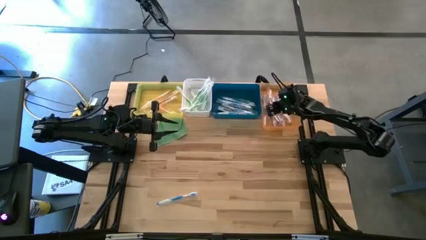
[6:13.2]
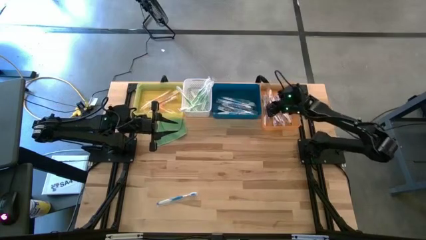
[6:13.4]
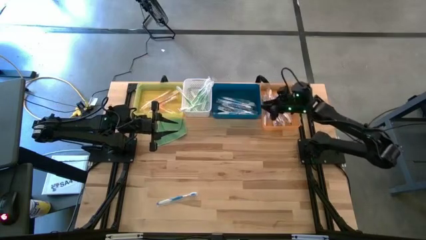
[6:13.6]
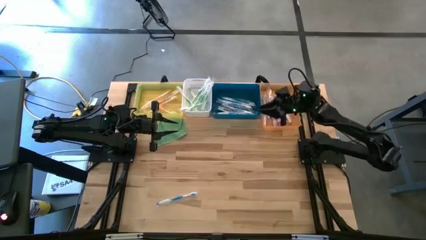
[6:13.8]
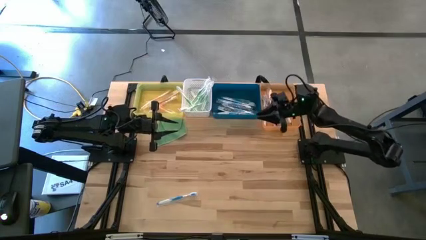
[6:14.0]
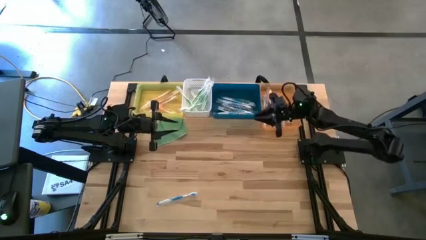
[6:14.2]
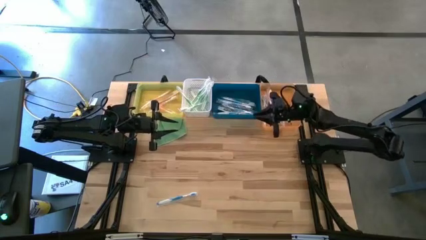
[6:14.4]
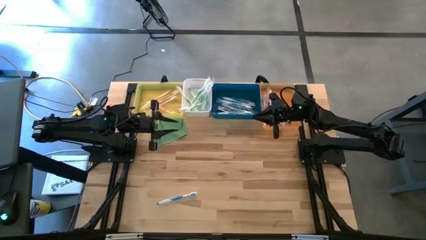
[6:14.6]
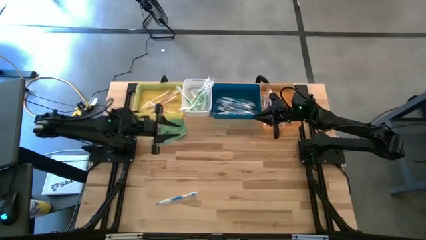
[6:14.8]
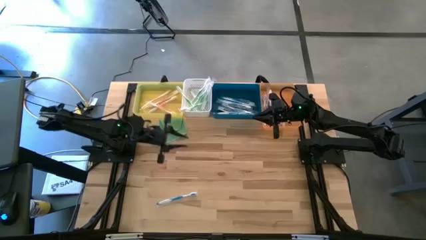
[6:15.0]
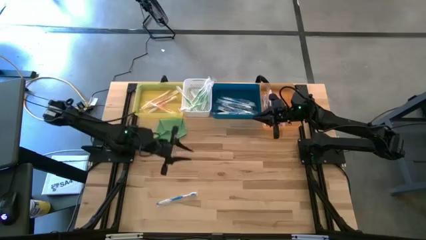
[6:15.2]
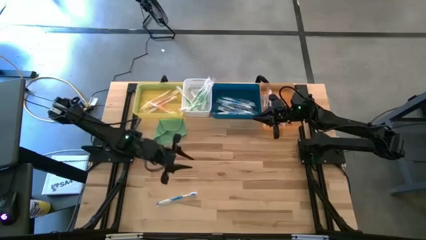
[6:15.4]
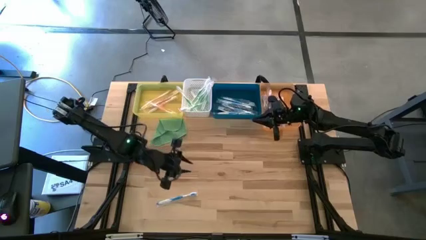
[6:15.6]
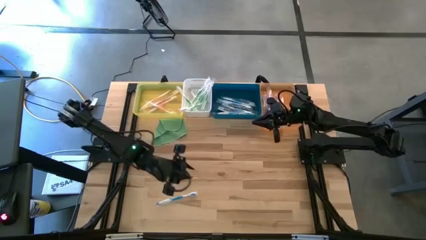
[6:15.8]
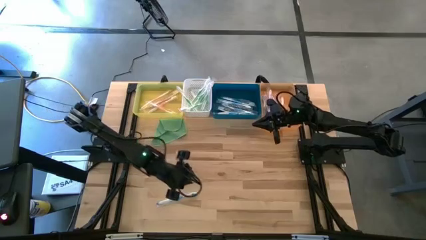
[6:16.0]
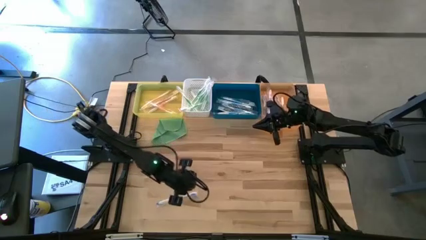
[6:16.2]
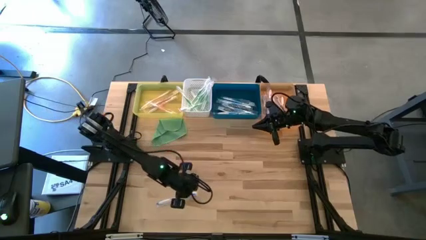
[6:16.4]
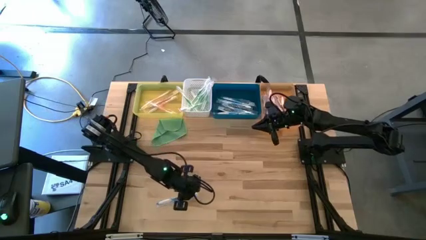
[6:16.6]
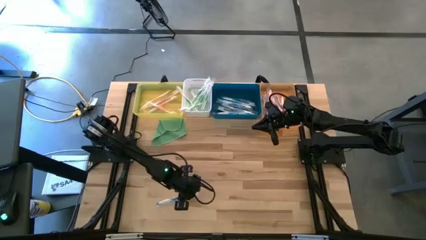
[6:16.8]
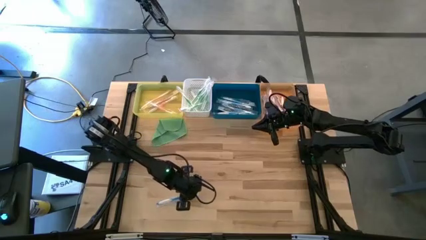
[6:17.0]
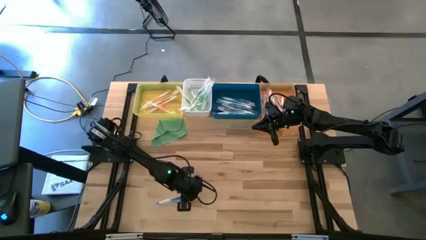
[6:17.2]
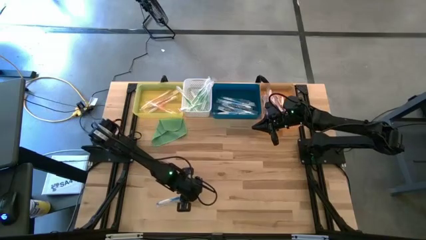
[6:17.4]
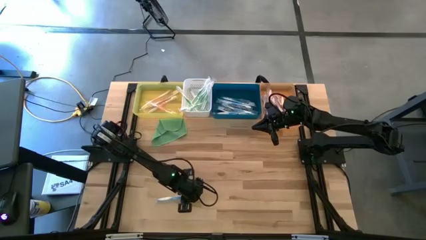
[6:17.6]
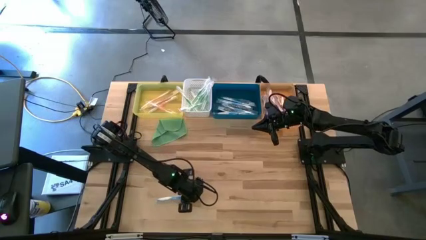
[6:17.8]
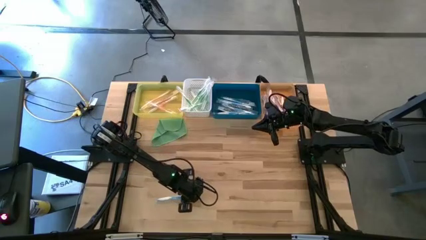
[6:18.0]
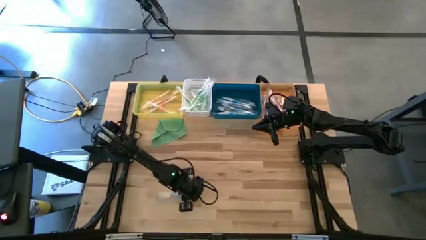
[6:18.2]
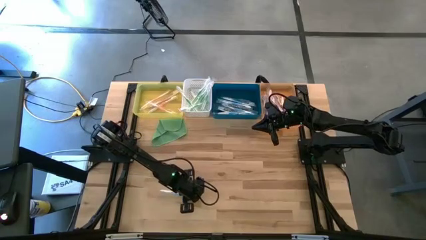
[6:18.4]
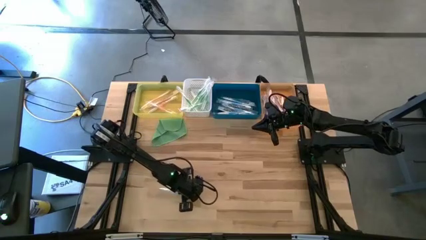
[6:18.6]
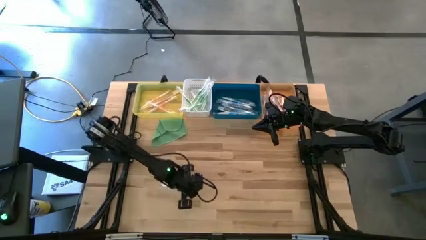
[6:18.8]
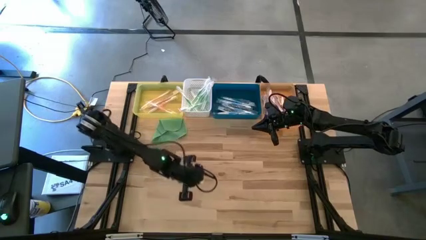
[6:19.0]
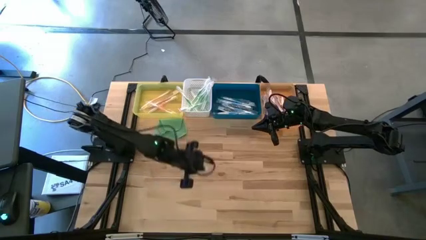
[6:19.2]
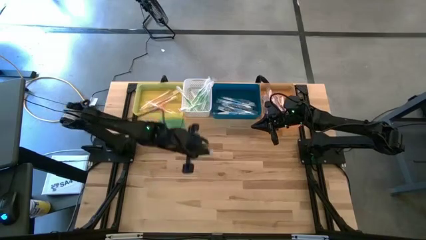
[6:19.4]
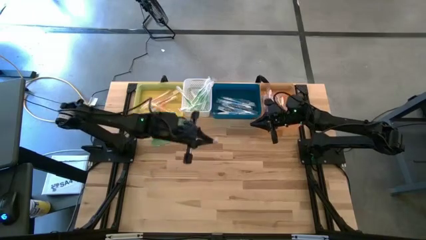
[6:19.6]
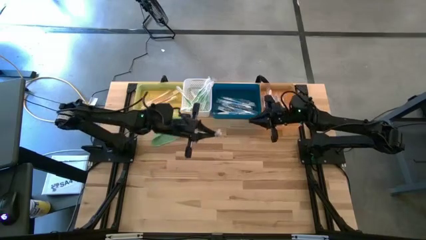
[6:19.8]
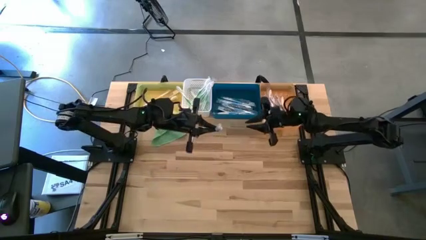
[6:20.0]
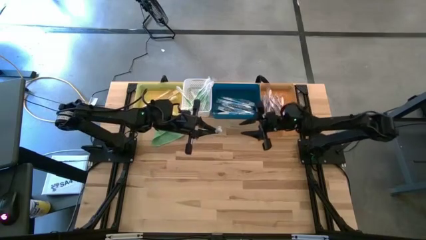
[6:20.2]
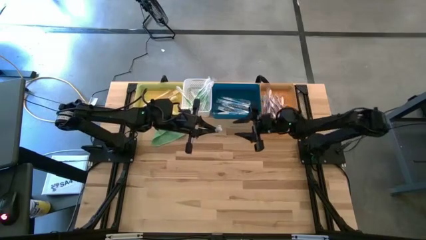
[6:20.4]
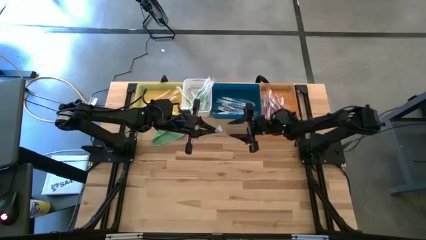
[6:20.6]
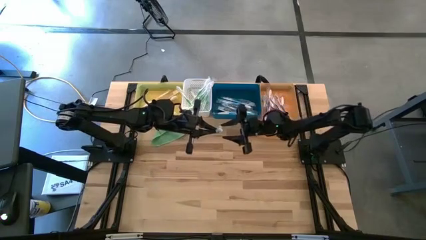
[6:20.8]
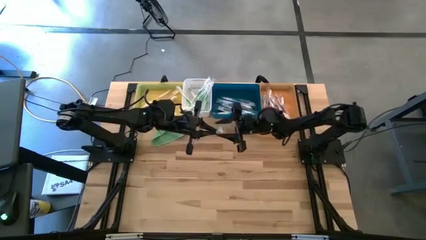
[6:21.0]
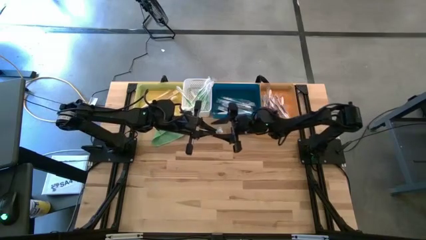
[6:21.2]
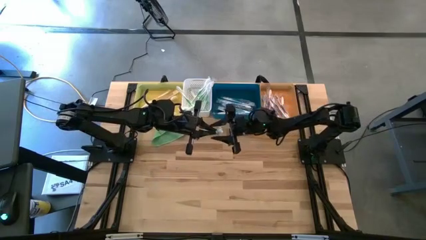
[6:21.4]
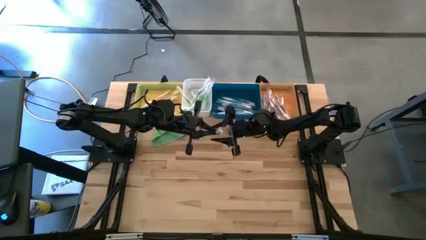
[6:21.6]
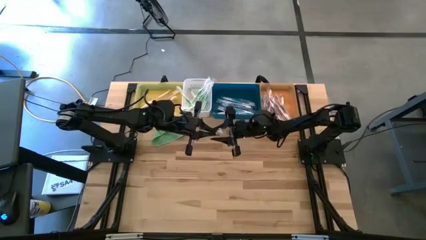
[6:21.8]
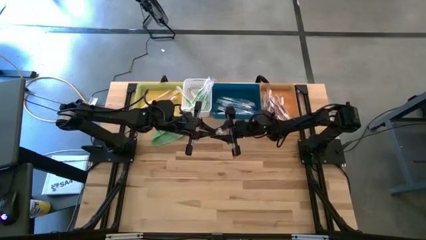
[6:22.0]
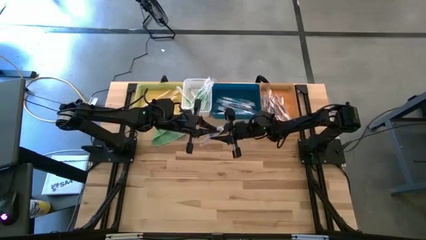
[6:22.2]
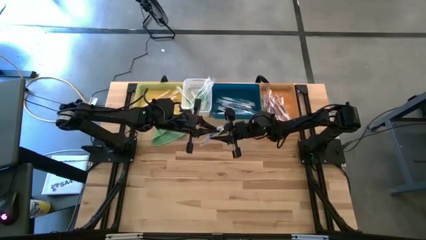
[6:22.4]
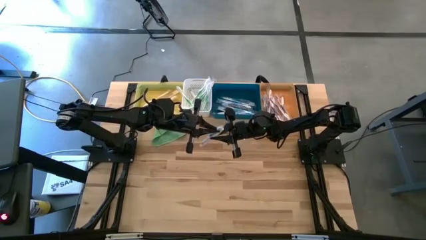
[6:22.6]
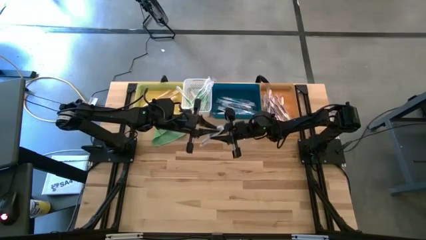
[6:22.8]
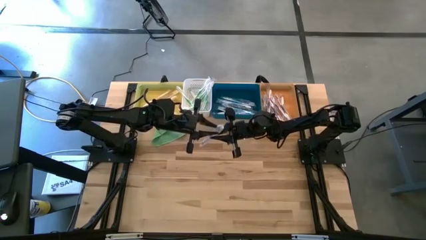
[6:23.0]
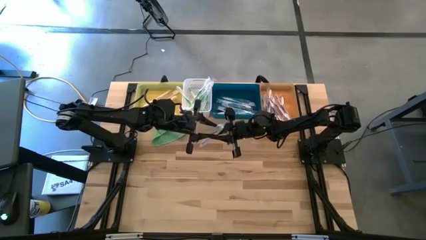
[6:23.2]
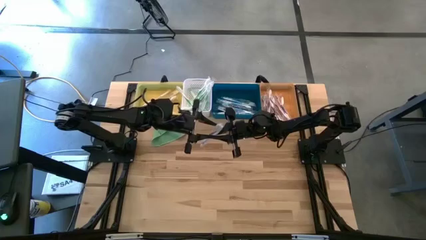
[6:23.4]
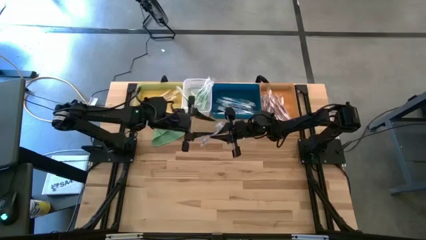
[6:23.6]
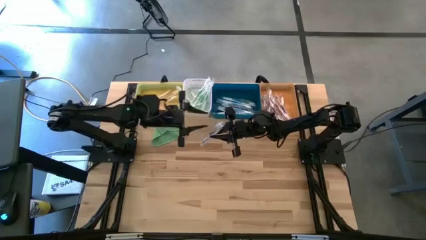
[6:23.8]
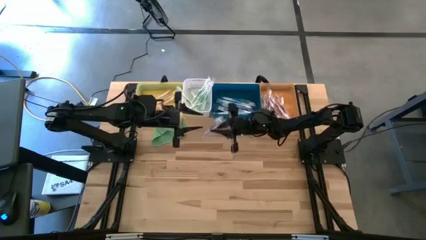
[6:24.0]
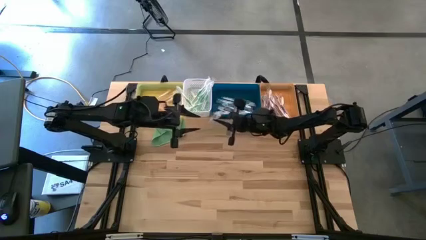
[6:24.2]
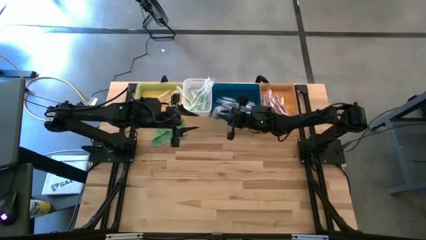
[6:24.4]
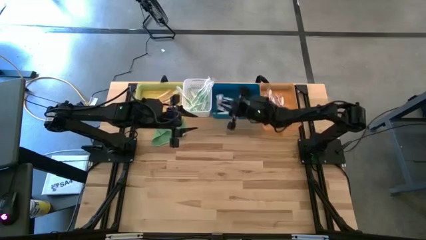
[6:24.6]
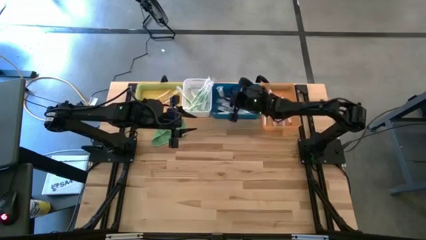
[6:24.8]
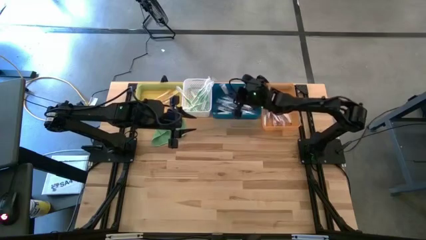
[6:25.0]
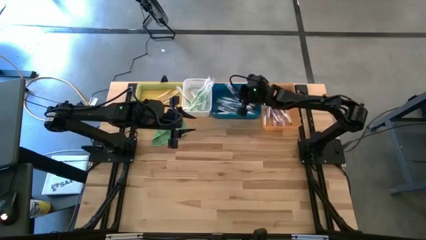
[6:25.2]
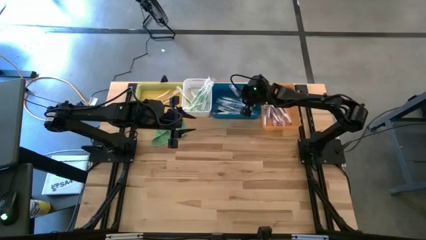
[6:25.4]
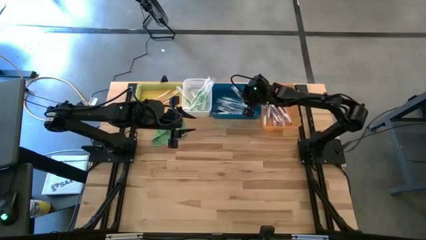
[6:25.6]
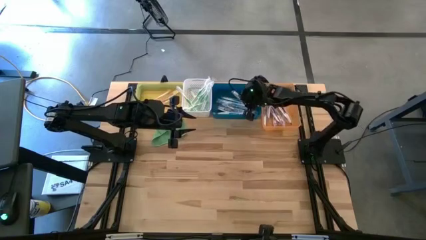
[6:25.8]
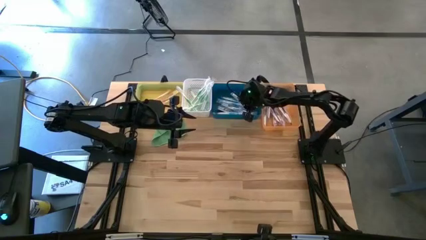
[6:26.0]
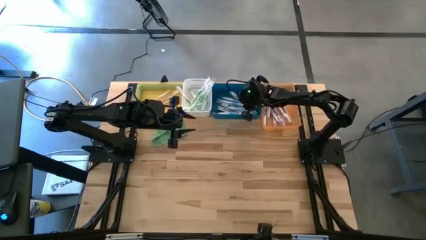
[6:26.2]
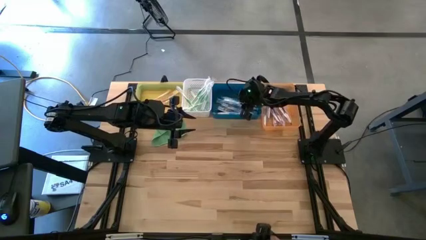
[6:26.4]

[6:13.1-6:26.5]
Task: Pick & Place Toothbrushes
Put the blue toothbrush into the blue bin
